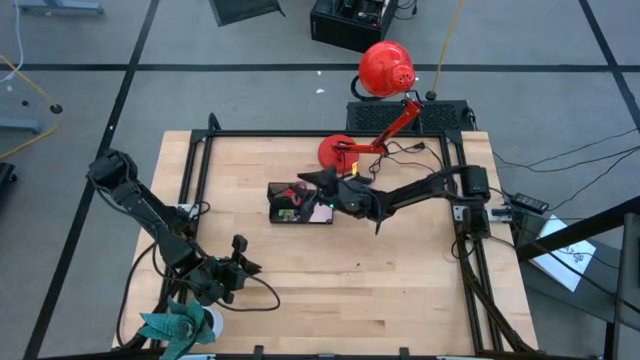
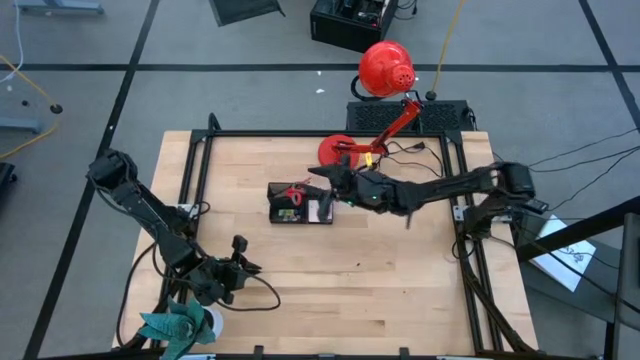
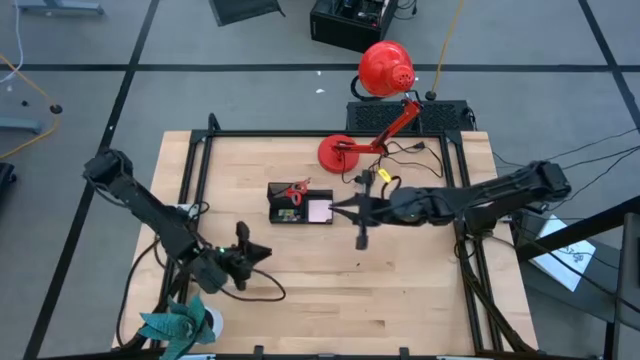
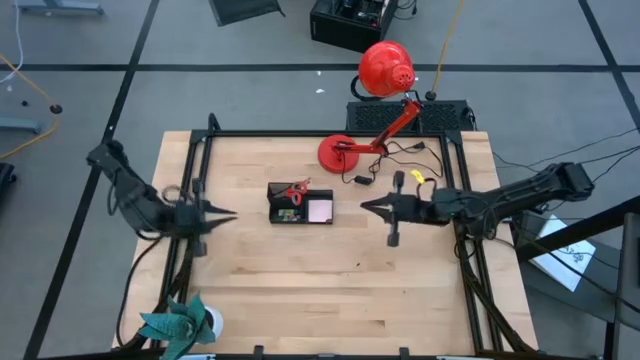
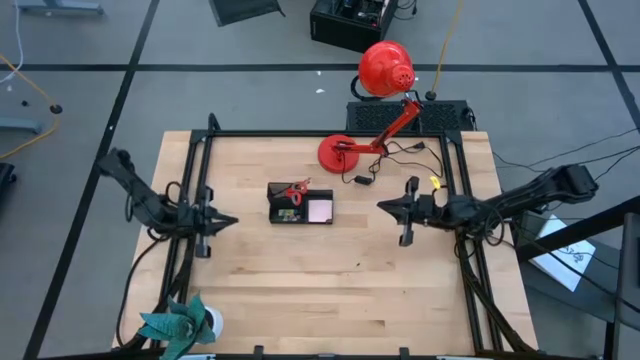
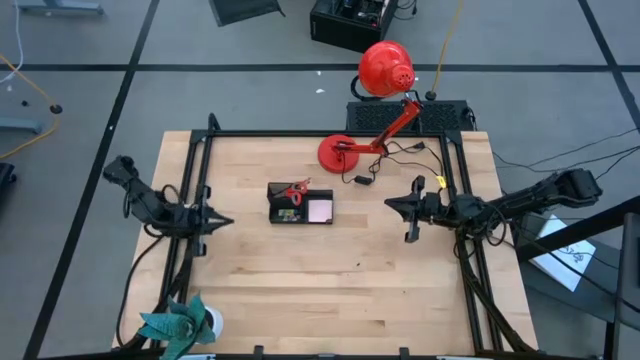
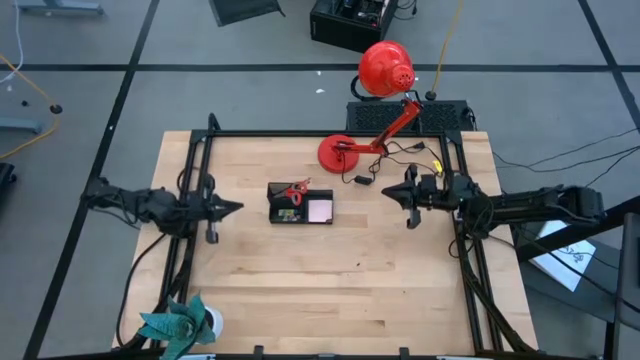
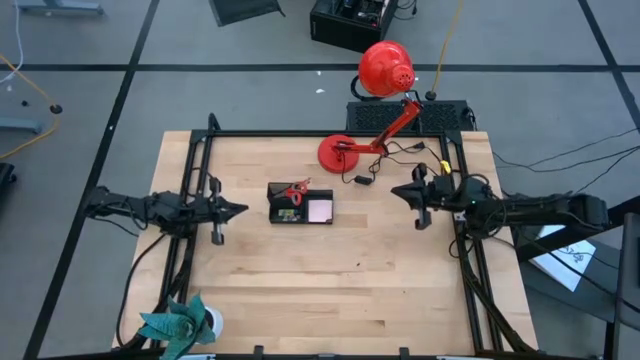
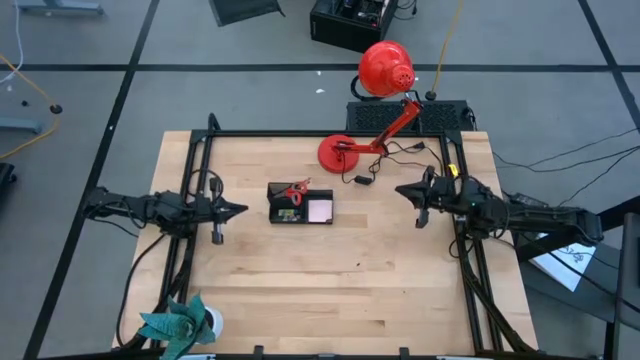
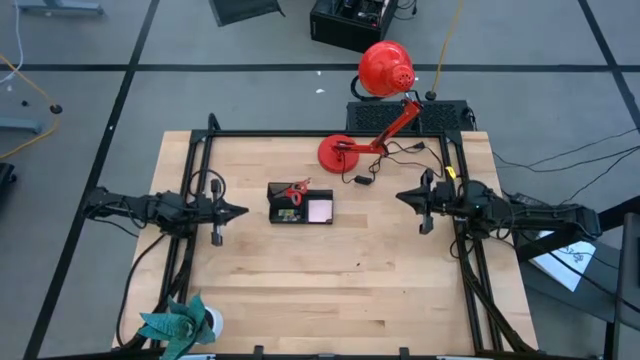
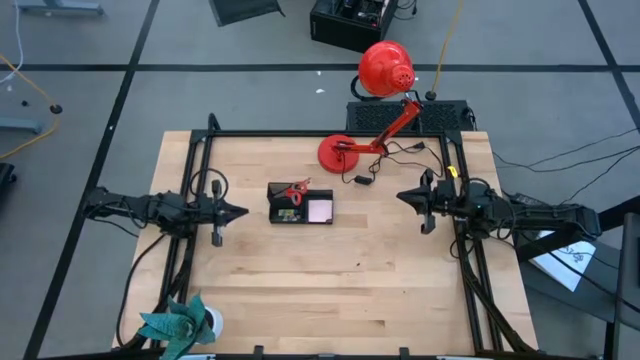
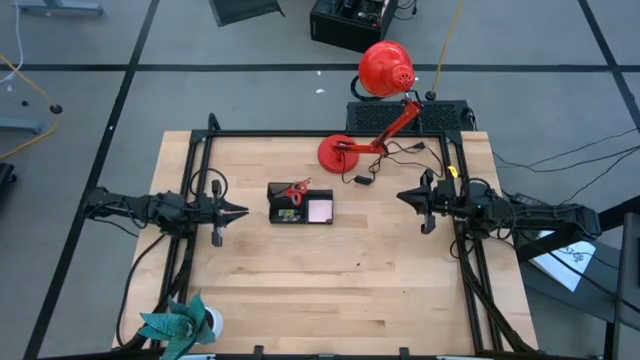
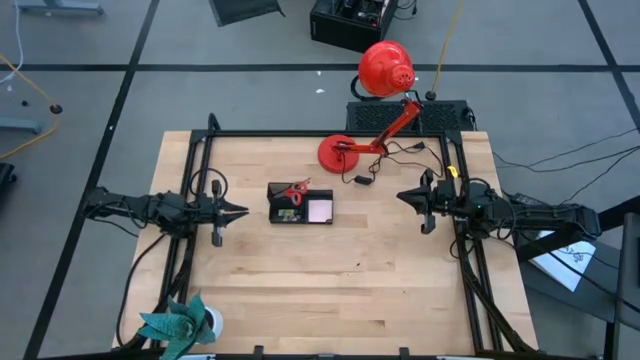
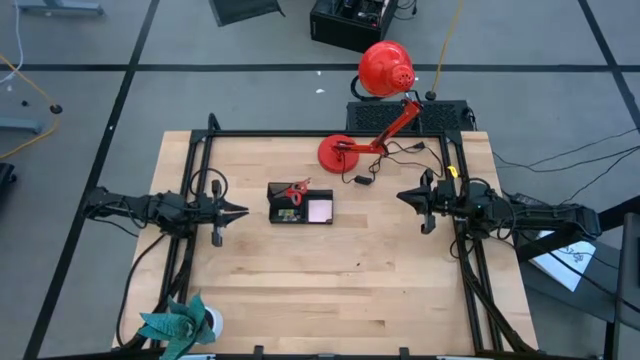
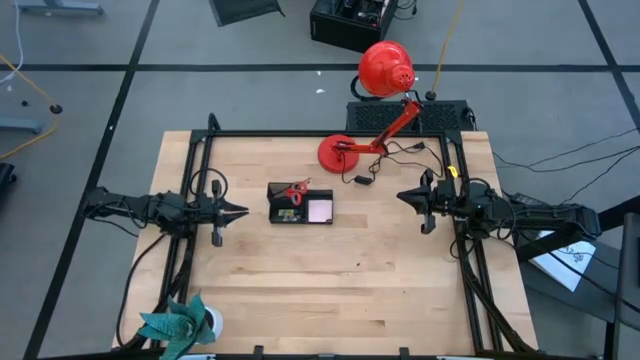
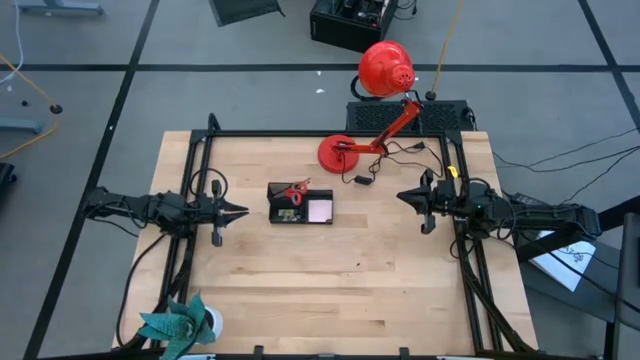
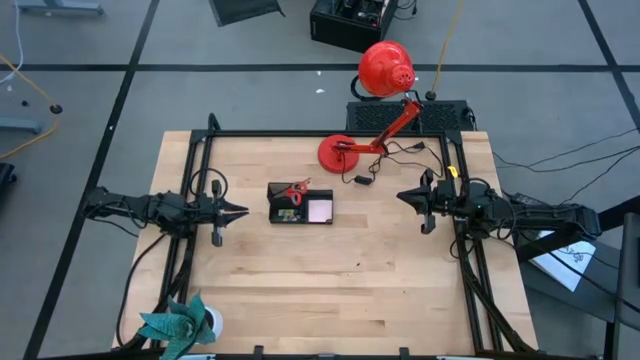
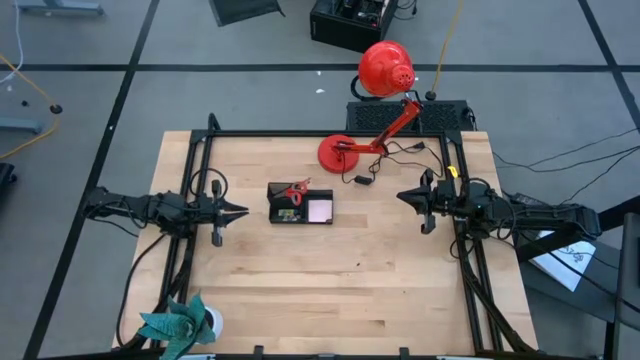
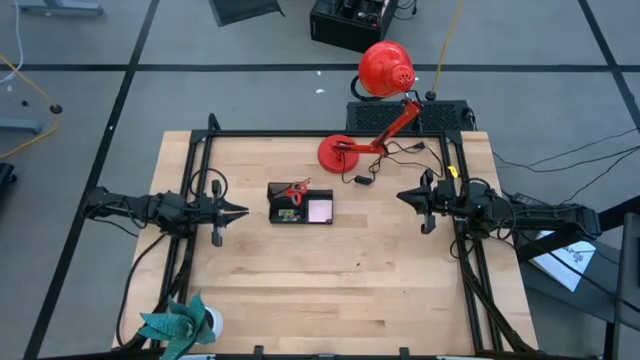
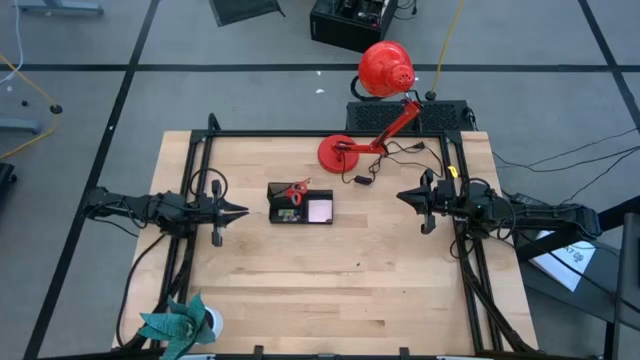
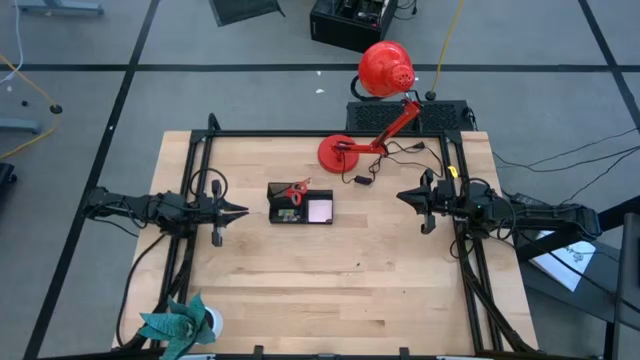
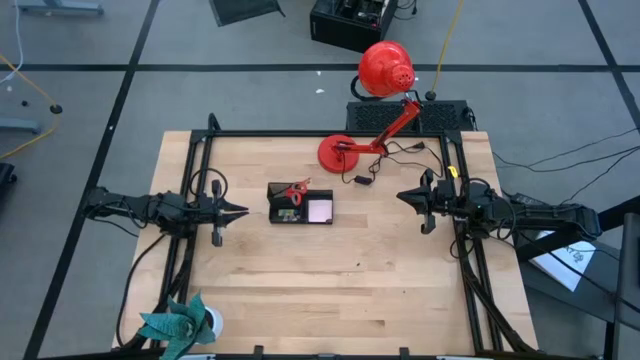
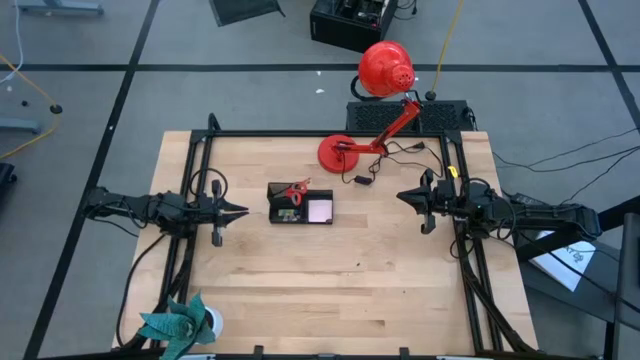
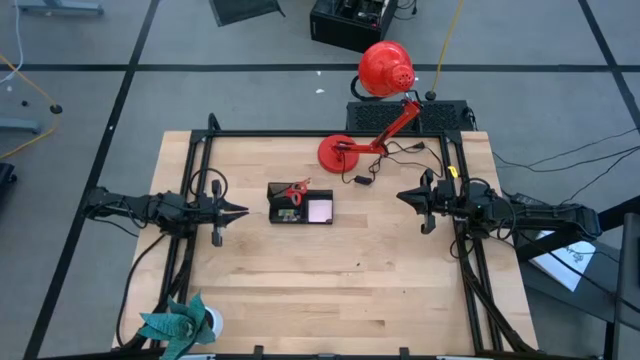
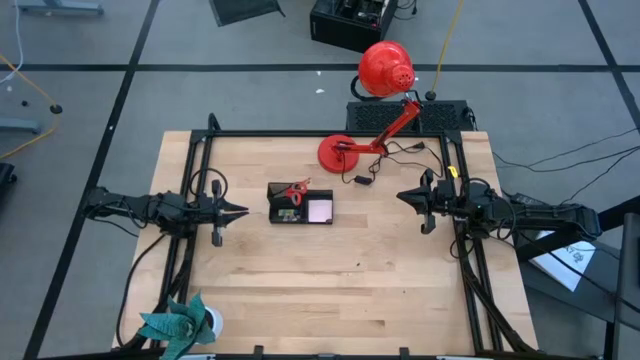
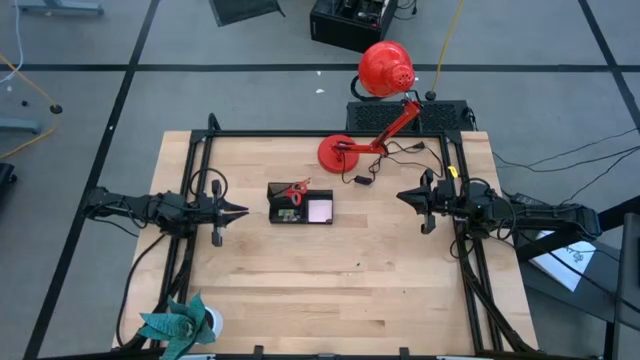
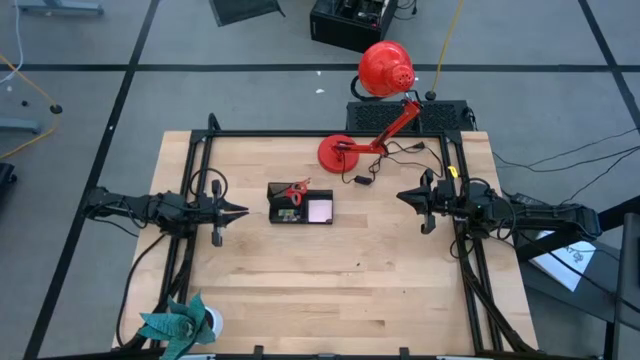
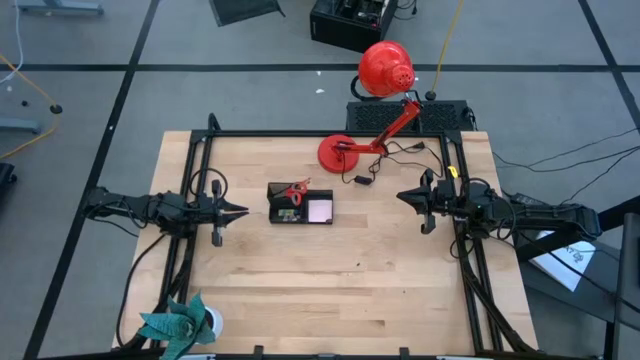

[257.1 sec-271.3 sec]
Task: Pick and place office supplies into organizer
Return to Home Position

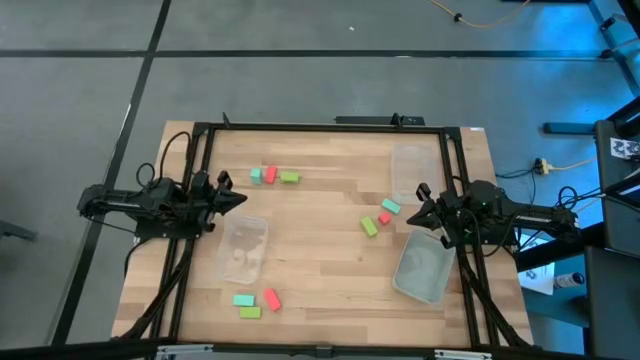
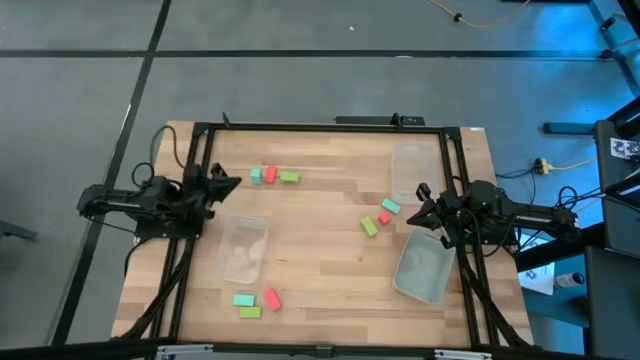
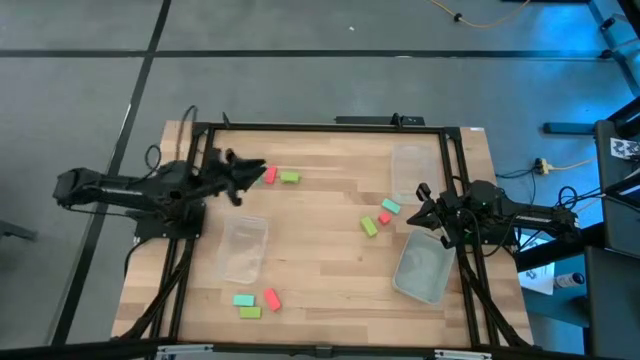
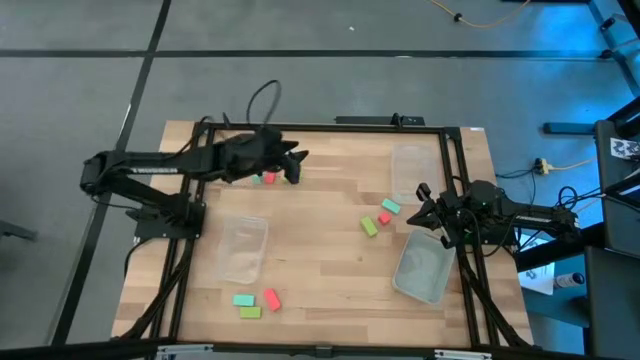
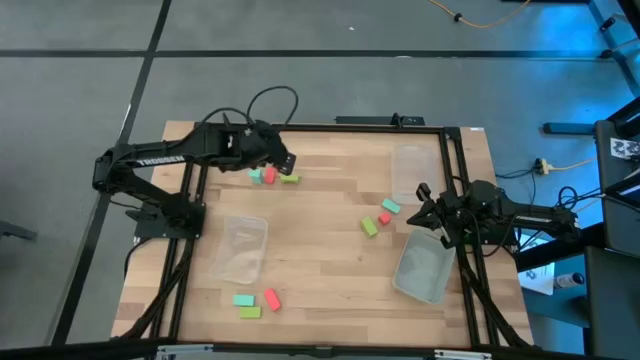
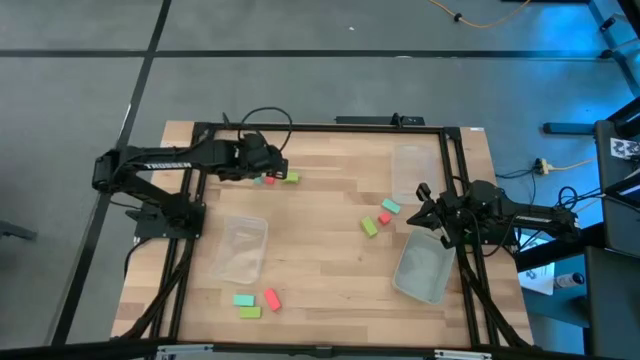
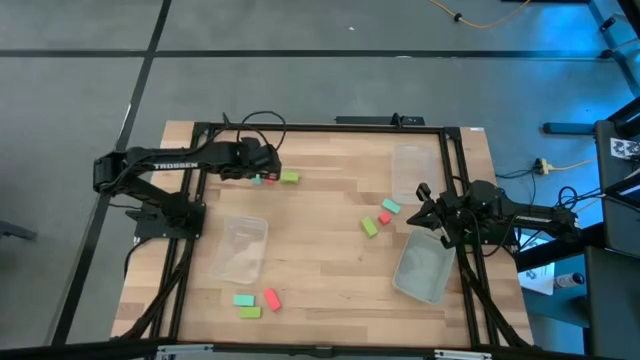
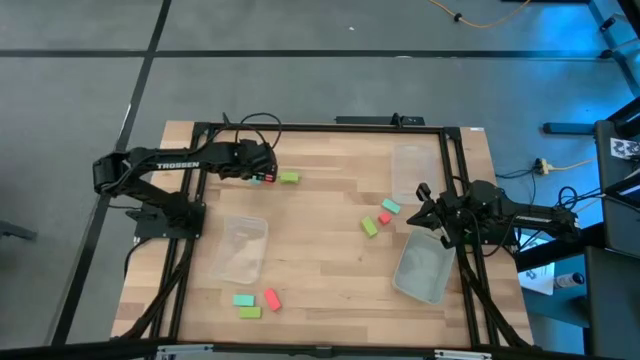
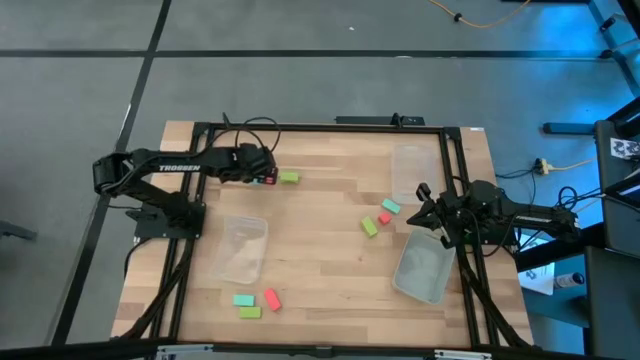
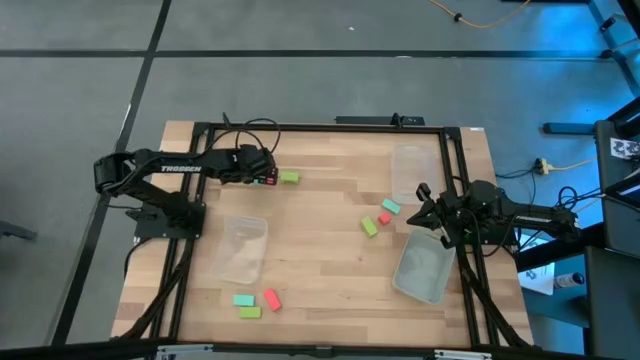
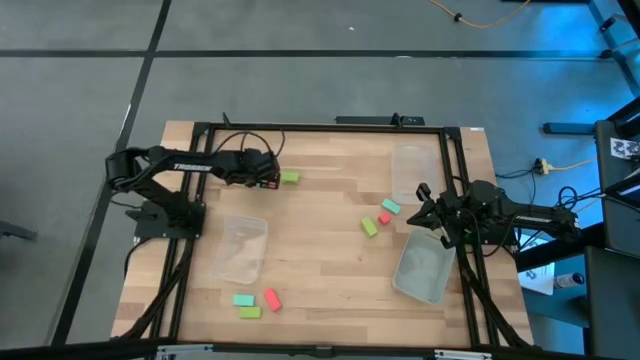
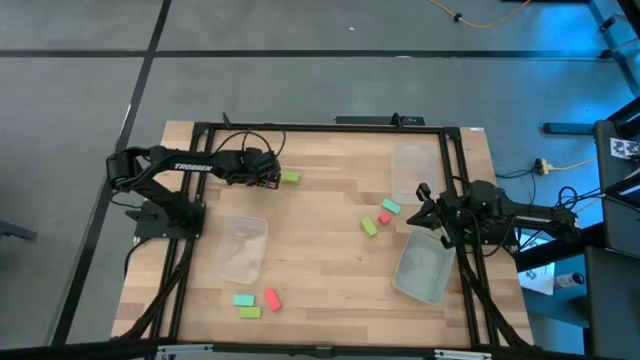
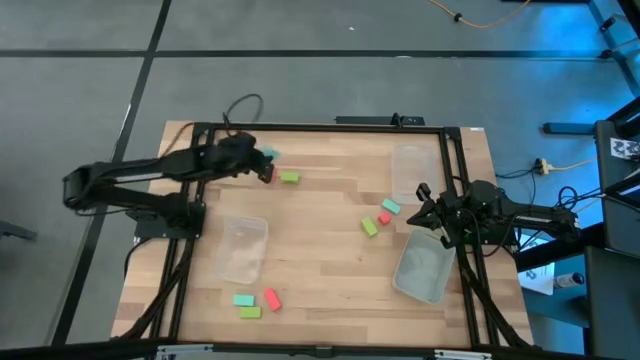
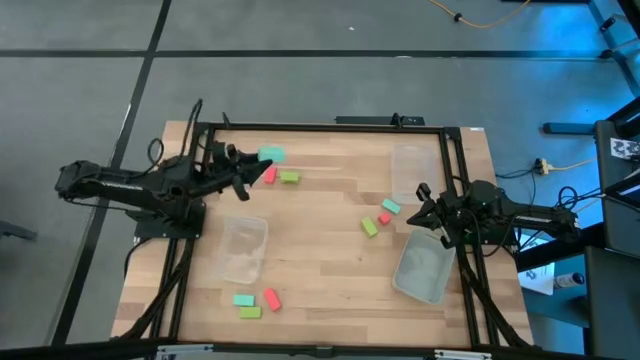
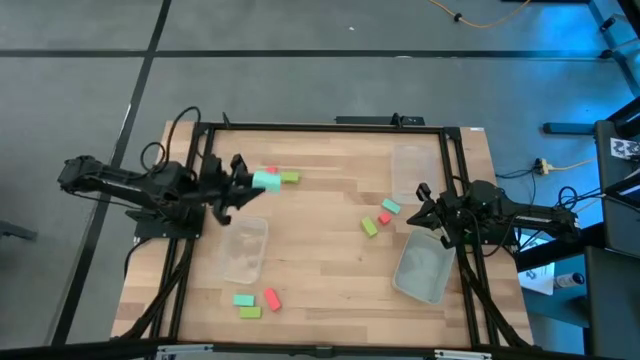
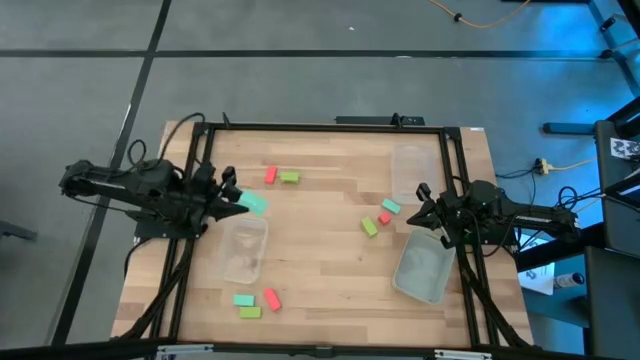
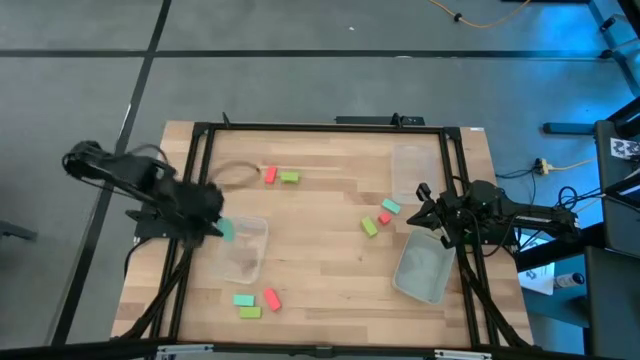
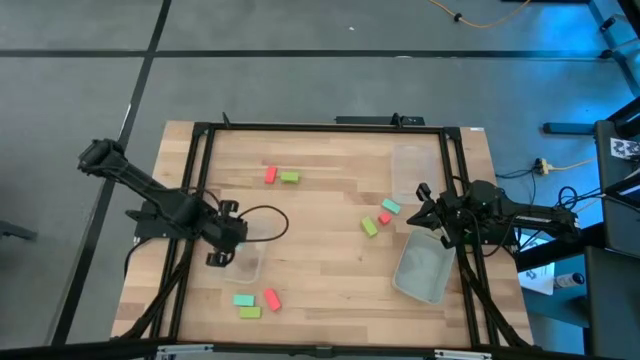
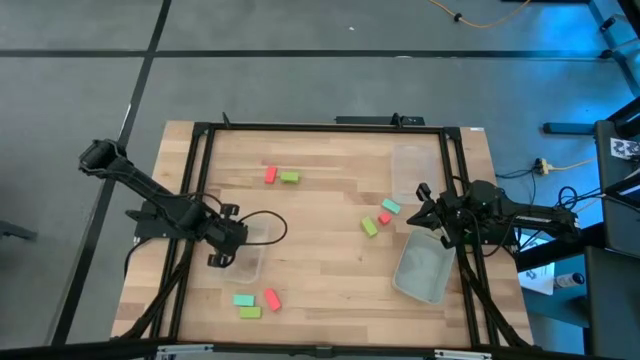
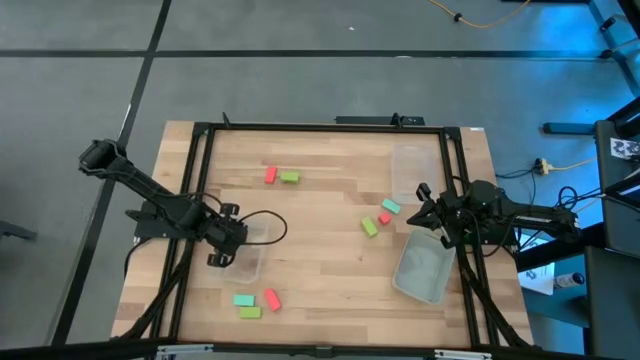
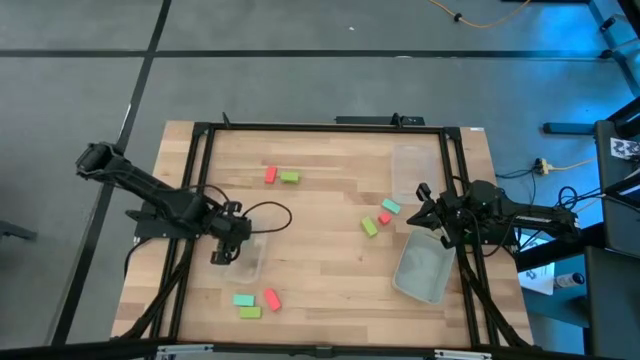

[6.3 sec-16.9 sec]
Task: Sort & place blocks by color
Put the top left blue block into the left transparent bin
